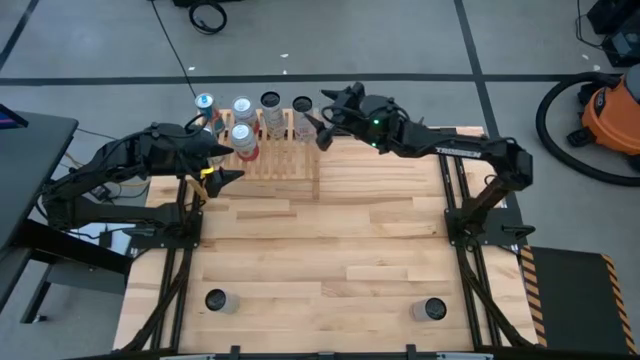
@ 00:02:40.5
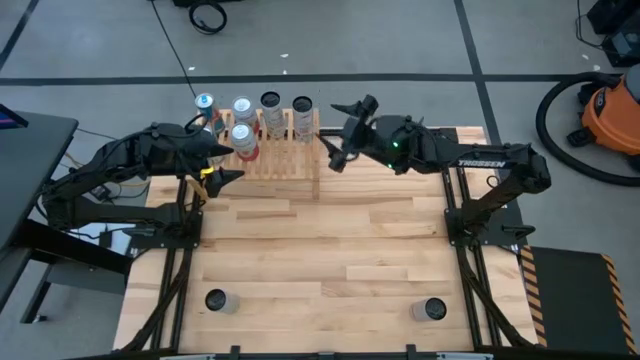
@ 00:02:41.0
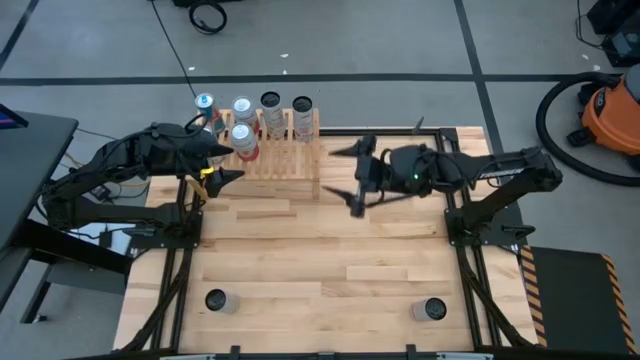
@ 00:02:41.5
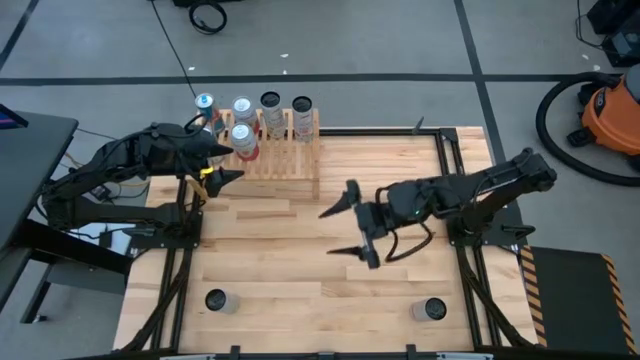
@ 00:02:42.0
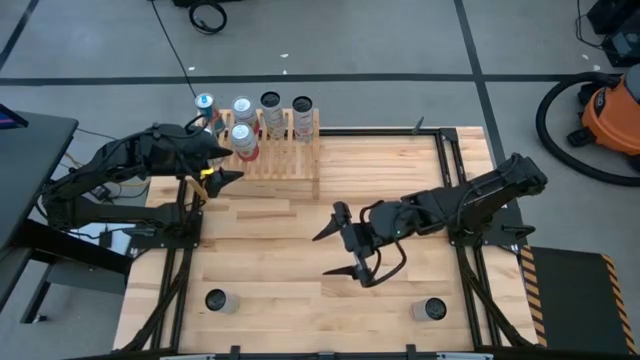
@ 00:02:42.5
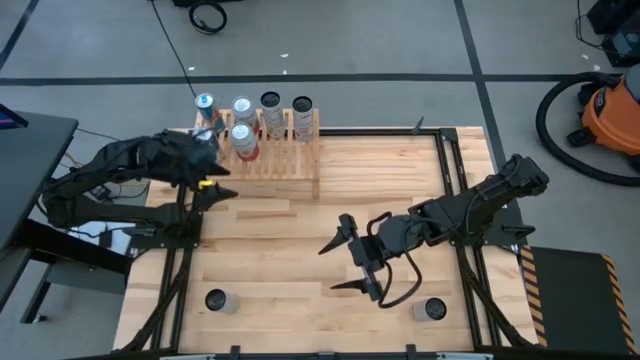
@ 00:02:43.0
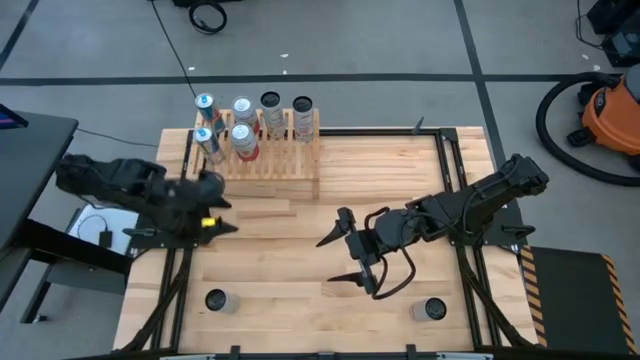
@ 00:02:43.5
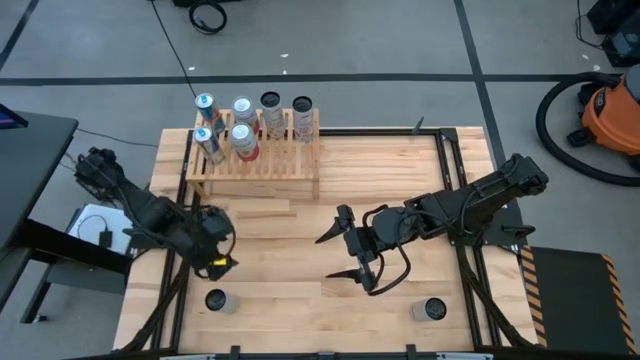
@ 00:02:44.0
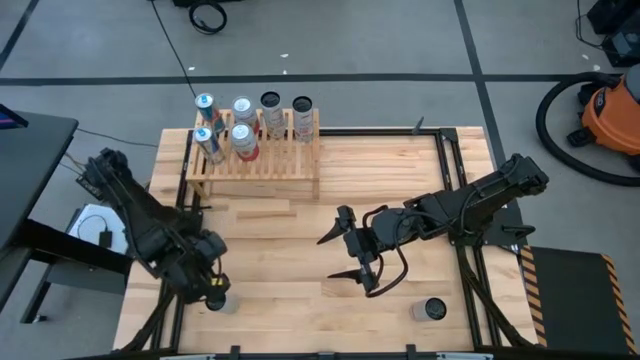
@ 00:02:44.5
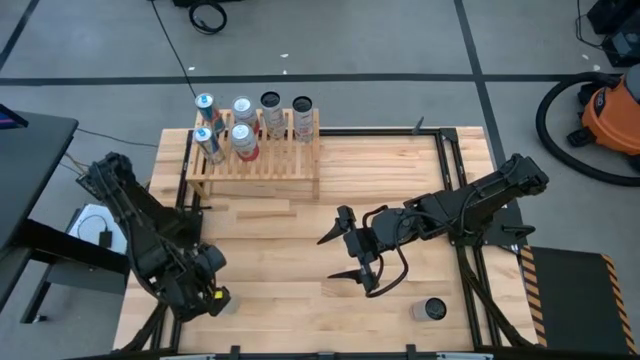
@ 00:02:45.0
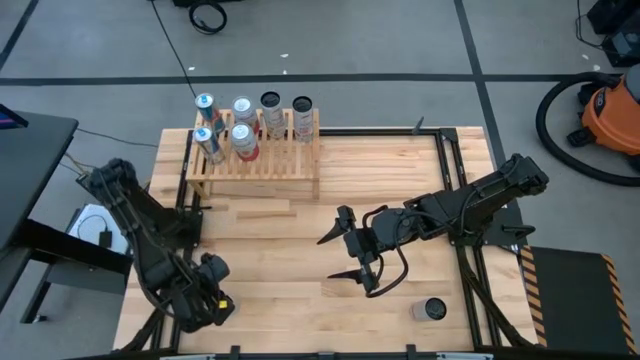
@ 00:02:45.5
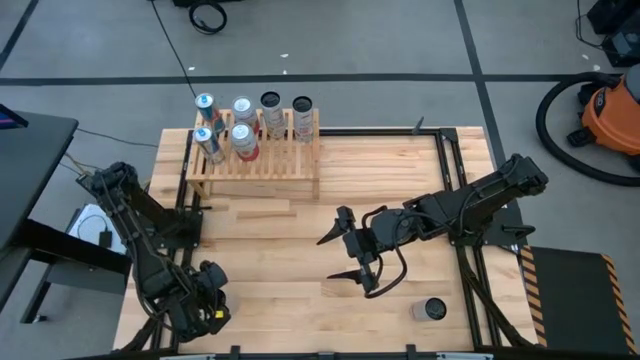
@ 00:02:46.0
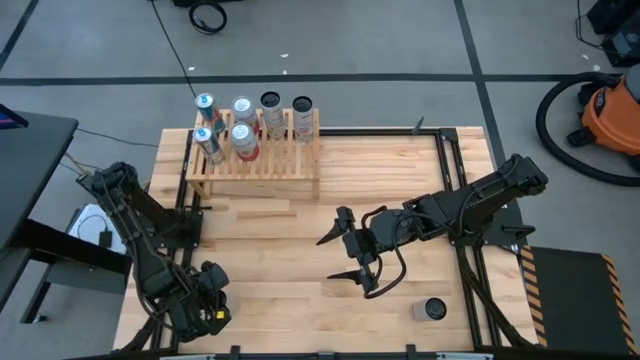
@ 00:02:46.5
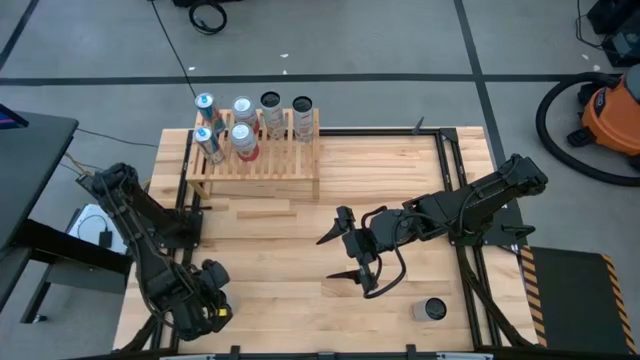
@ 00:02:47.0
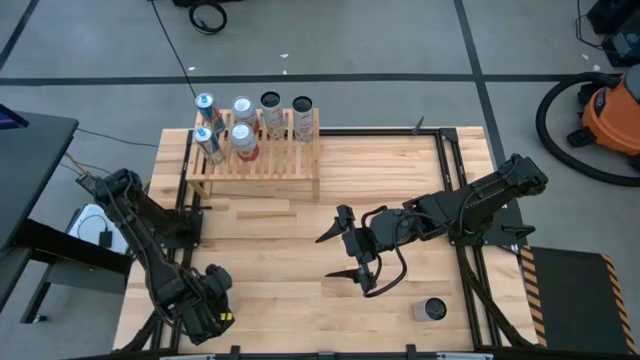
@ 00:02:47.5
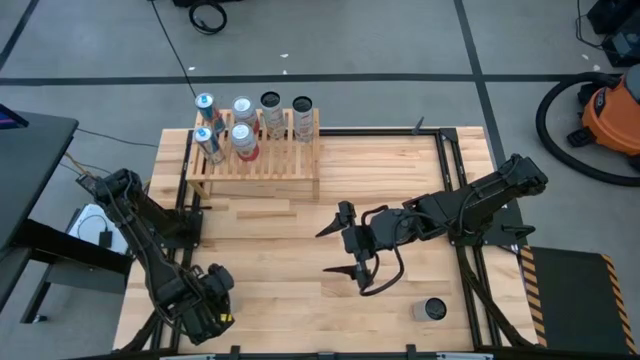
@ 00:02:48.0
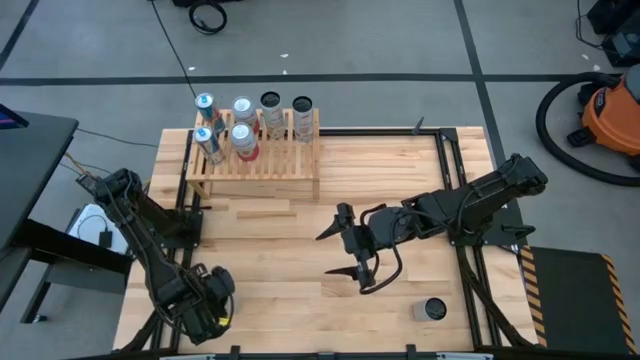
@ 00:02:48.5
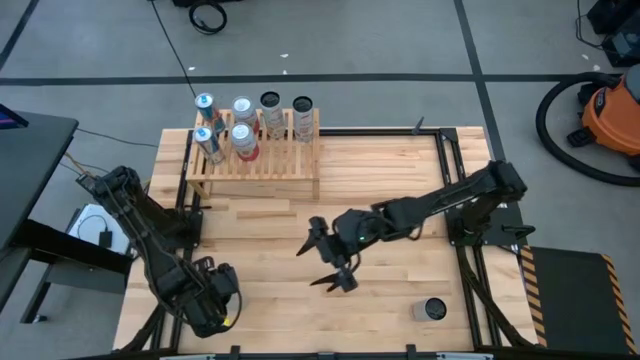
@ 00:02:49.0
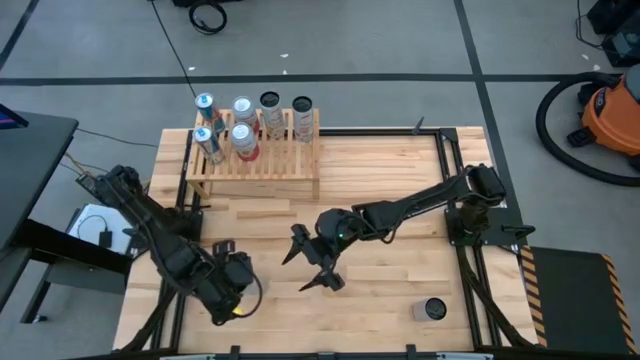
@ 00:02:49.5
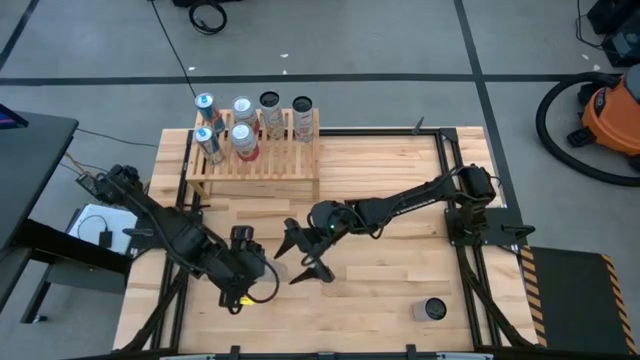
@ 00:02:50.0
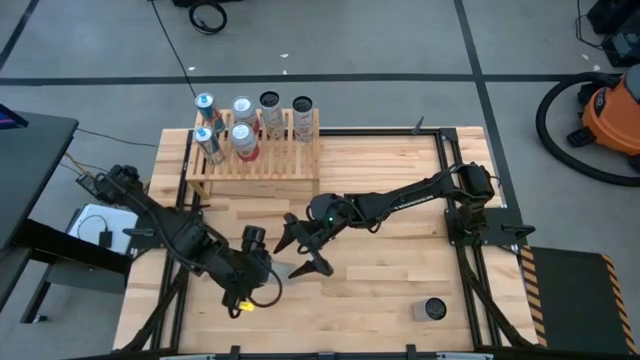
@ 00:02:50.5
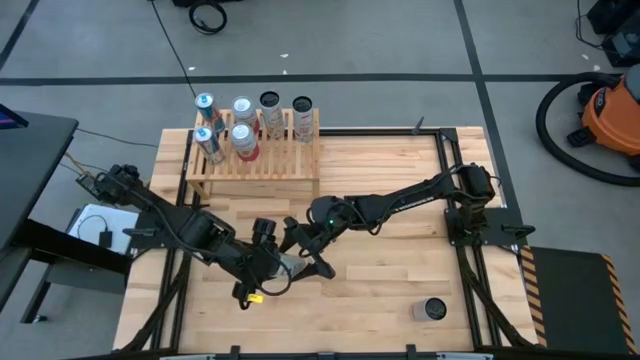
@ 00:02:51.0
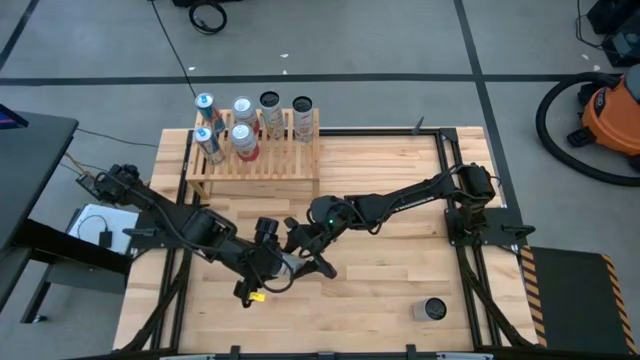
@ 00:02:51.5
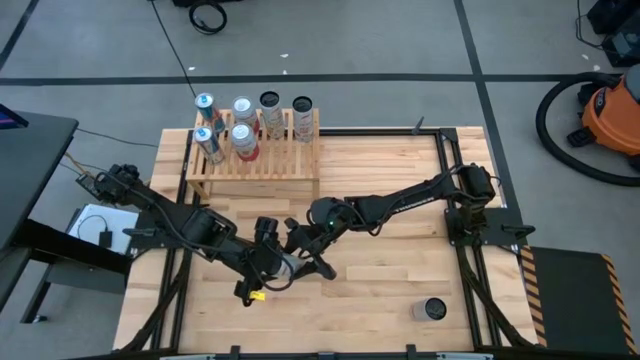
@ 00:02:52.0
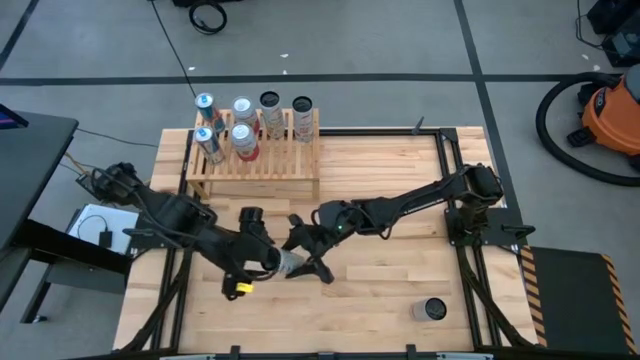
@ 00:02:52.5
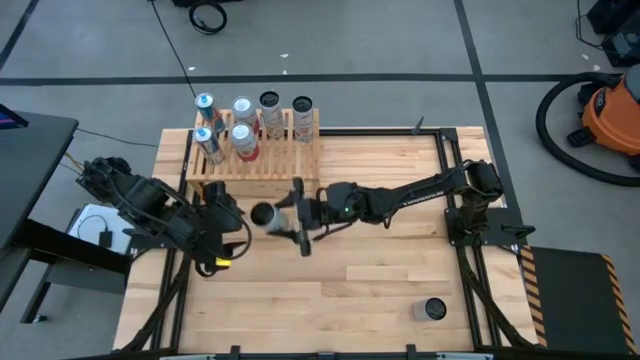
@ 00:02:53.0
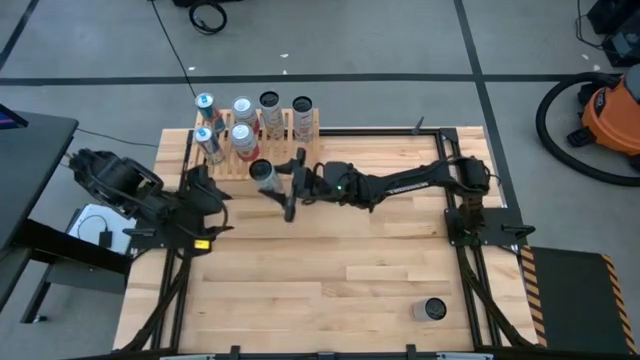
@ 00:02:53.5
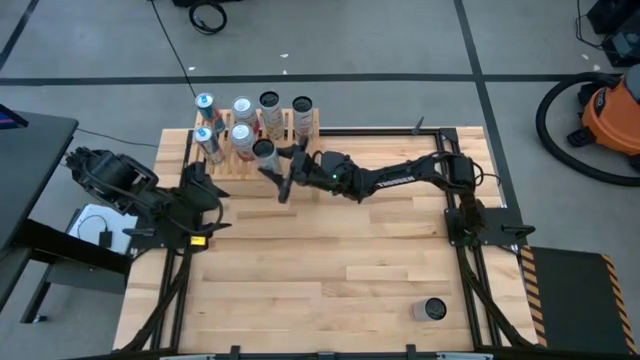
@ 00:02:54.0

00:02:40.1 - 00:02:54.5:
Task: Place canned beverage on shelf
Put the white and yellow soda can on the shelf aligned with the other white and yellow soda can

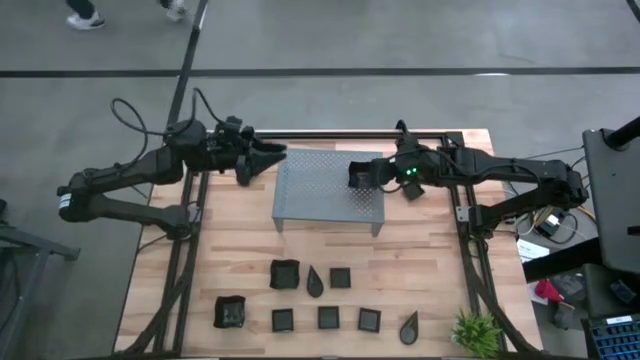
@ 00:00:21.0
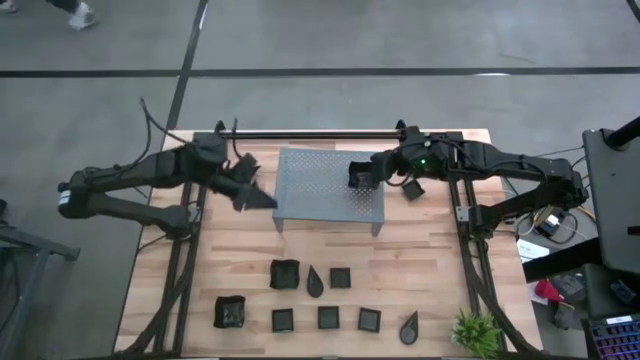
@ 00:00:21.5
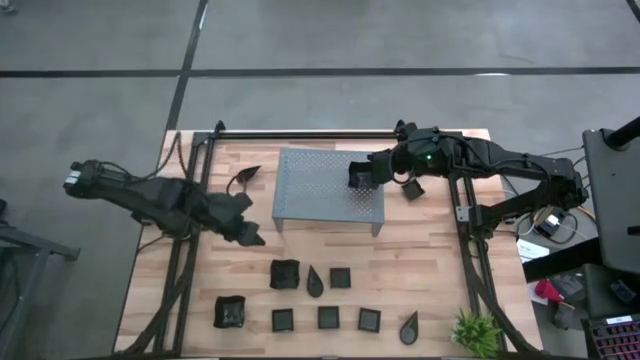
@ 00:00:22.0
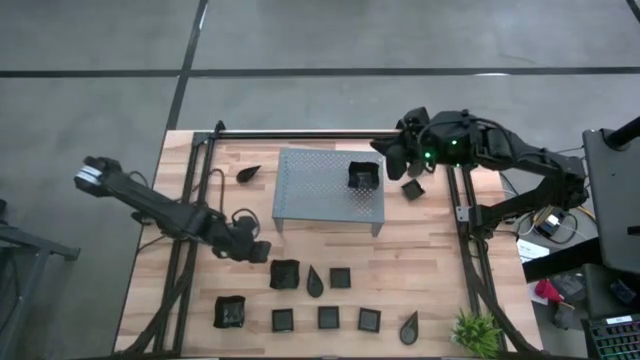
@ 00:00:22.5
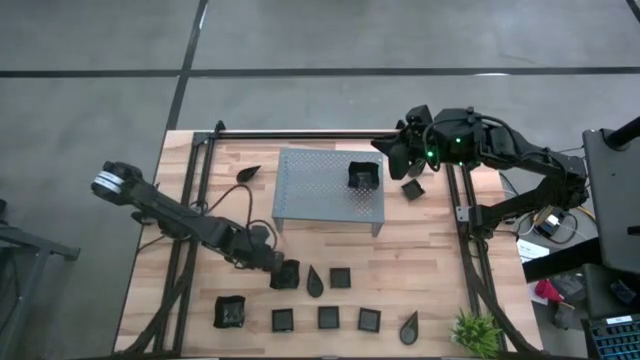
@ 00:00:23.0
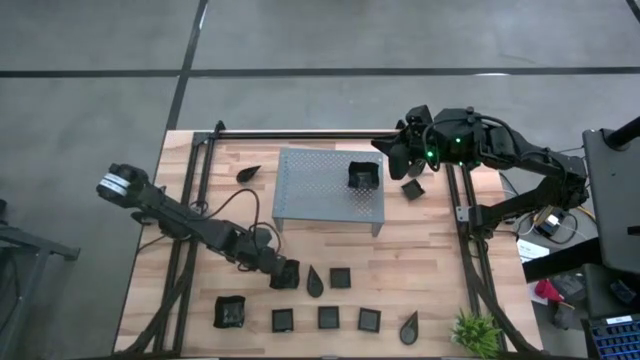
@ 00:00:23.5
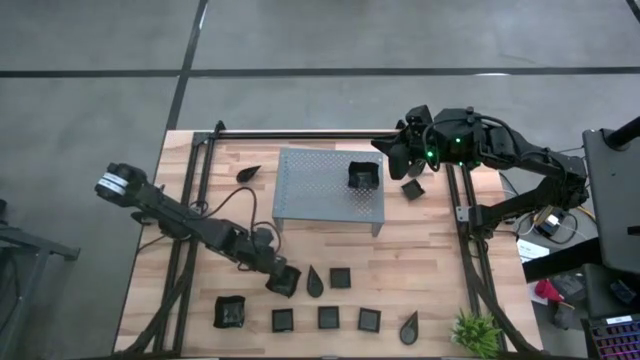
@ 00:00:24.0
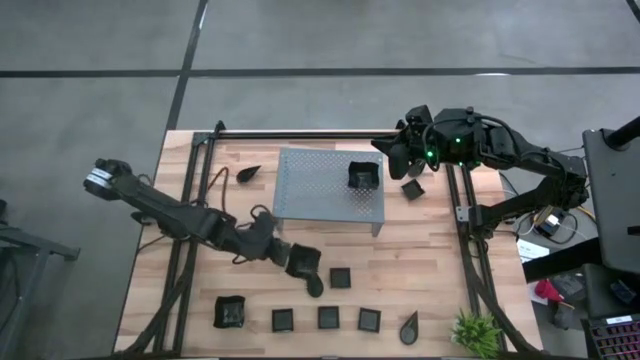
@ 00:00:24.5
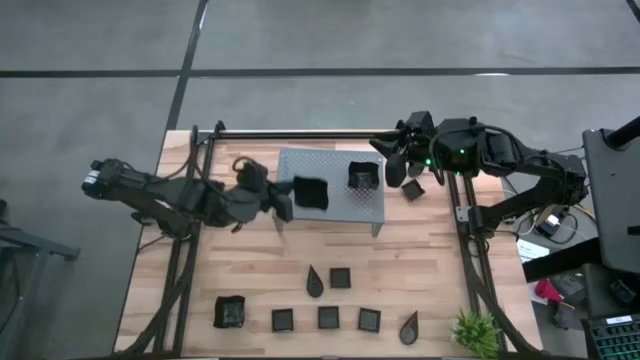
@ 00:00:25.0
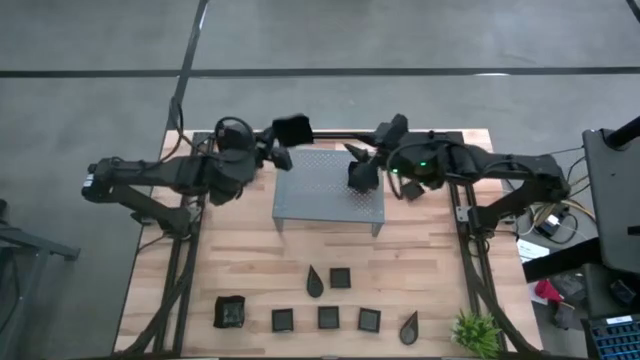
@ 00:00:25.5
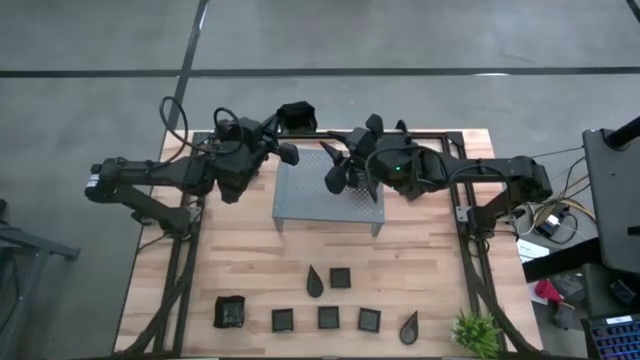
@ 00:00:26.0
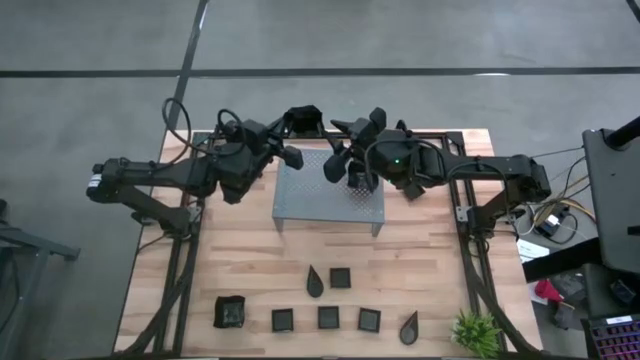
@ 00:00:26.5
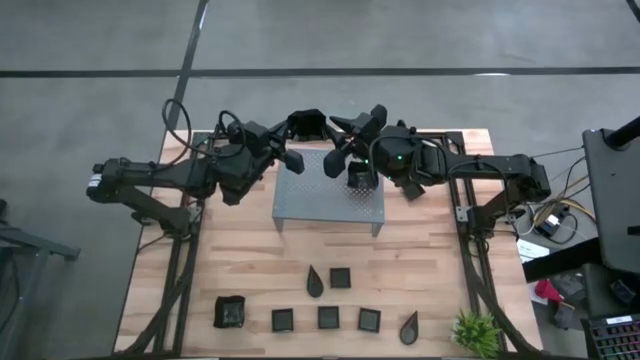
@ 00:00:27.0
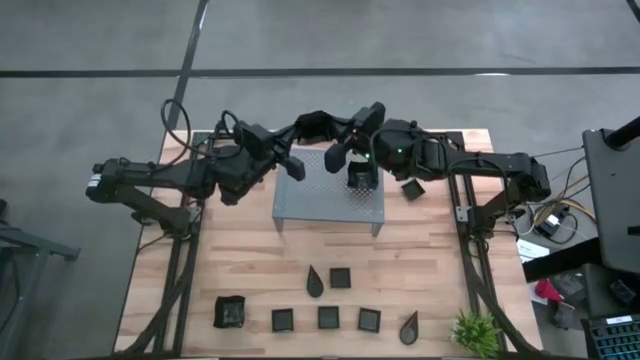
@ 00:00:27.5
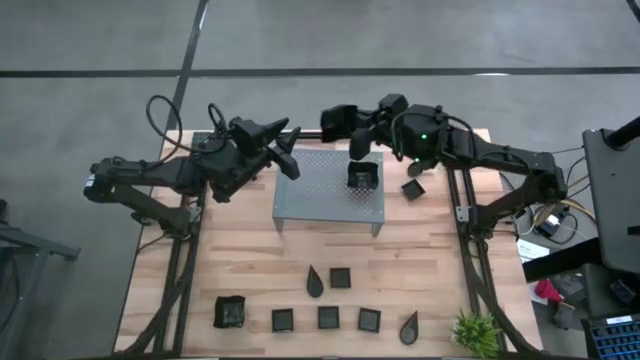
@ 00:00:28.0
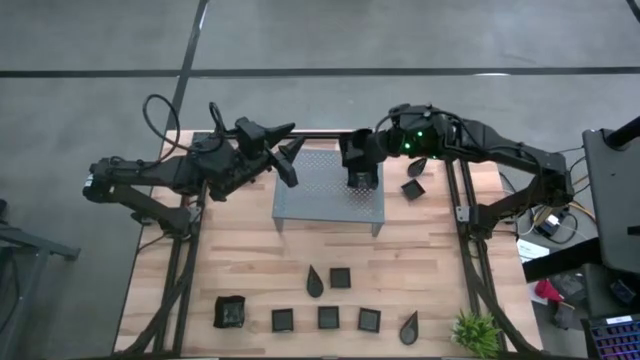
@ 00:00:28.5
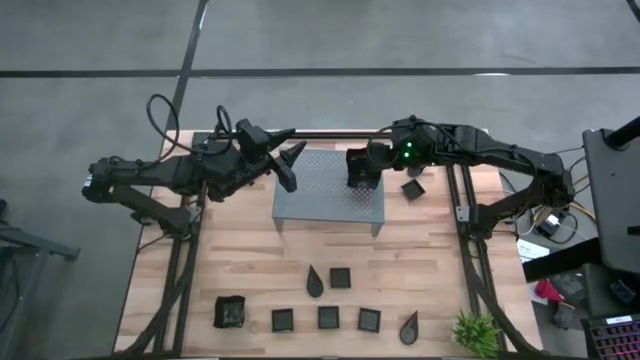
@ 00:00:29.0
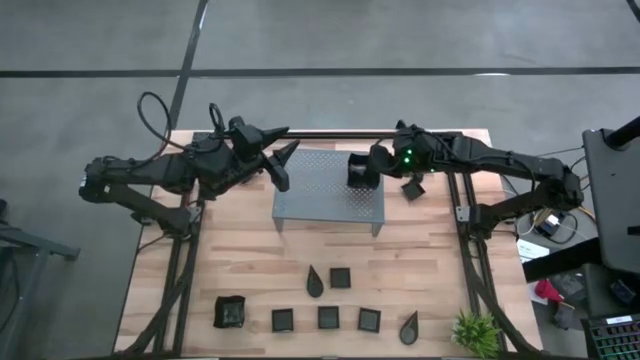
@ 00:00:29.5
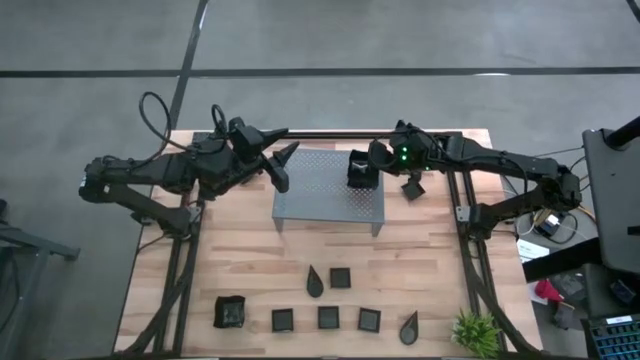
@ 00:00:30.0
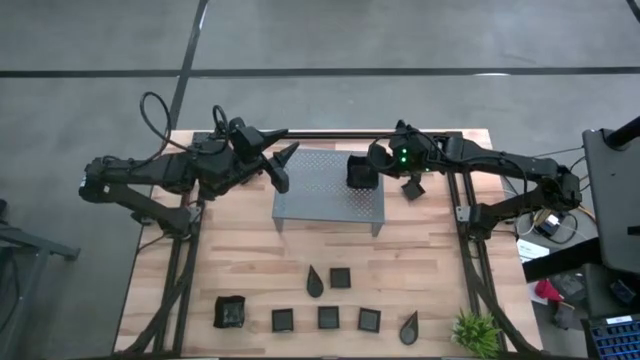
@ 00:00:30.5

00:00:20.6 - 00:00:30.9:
Task: Pick & Place Mini shaped plates
Stack the black distorted square plate on top of the other black distorted square plates on the shelf
